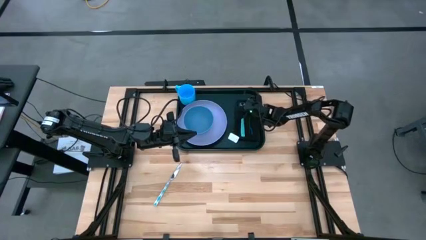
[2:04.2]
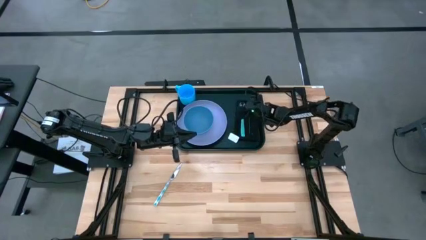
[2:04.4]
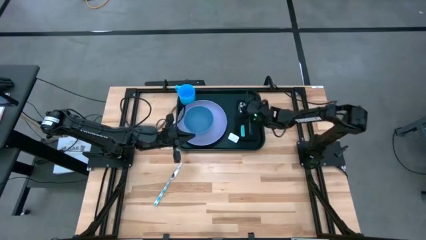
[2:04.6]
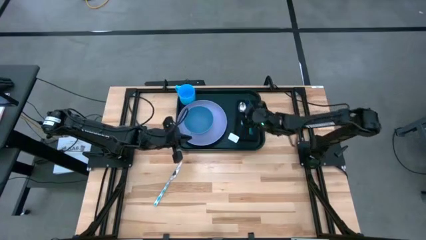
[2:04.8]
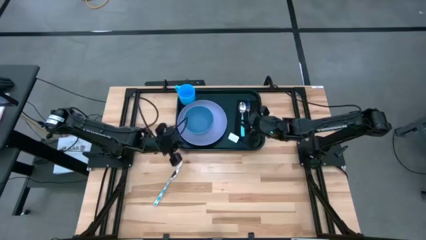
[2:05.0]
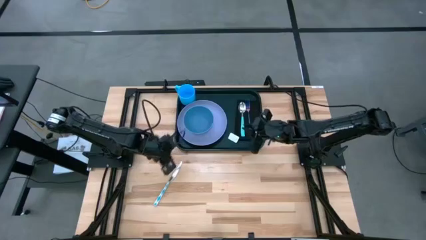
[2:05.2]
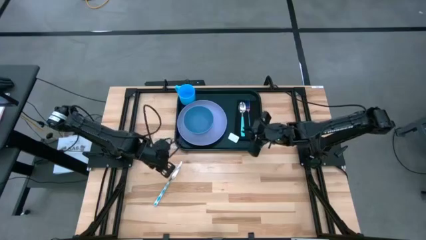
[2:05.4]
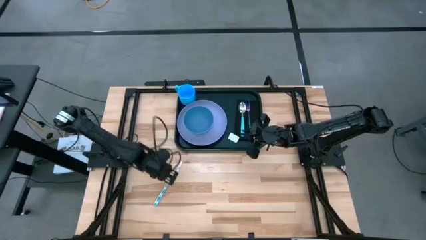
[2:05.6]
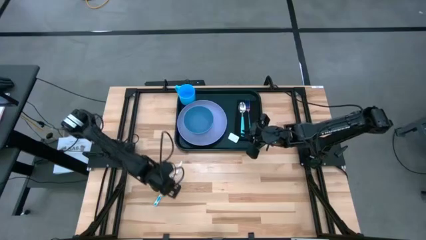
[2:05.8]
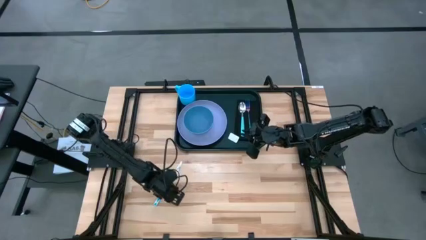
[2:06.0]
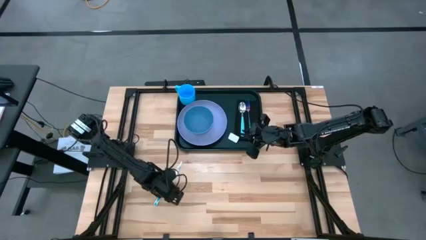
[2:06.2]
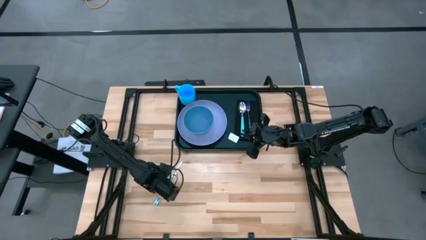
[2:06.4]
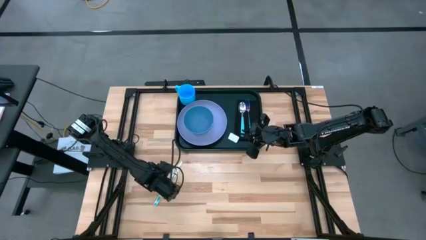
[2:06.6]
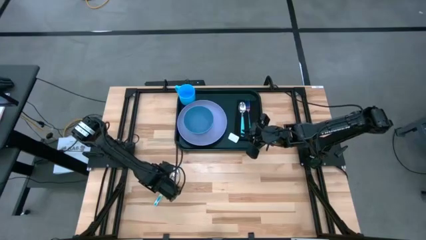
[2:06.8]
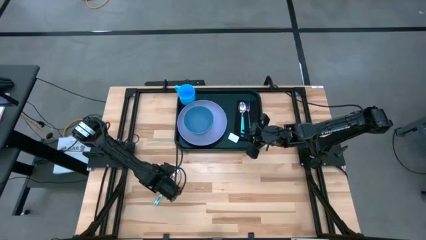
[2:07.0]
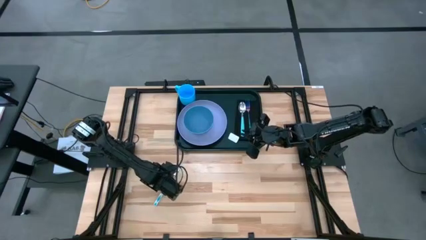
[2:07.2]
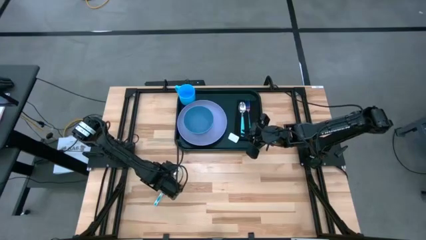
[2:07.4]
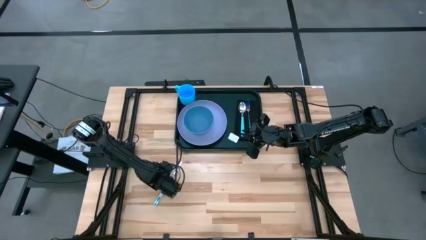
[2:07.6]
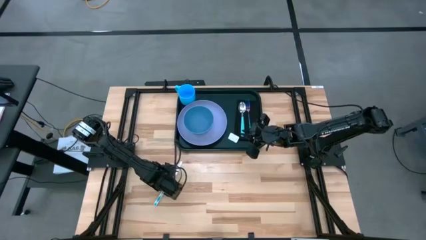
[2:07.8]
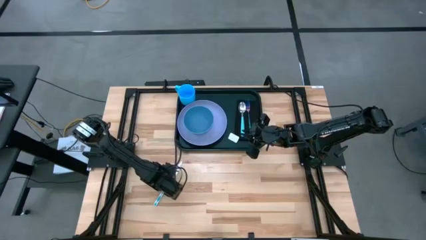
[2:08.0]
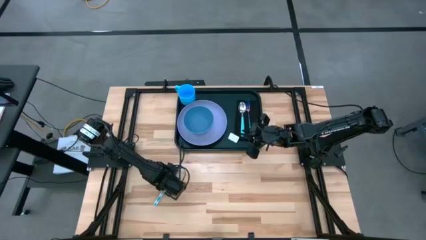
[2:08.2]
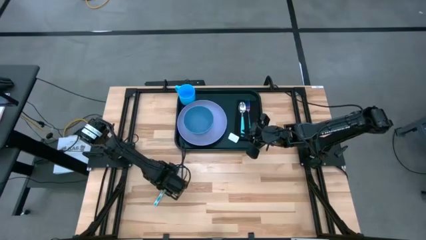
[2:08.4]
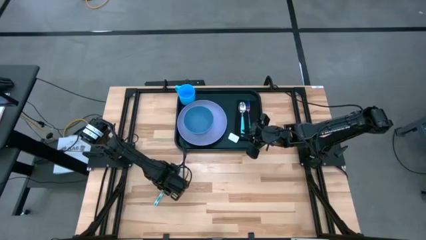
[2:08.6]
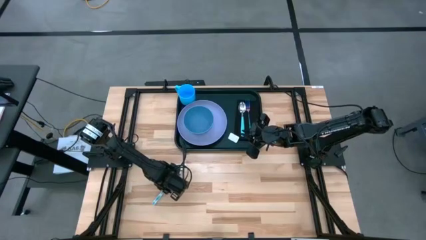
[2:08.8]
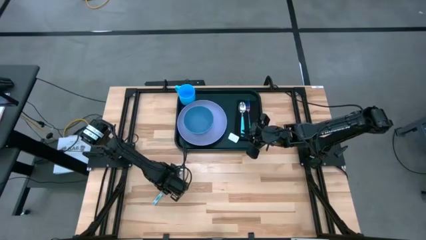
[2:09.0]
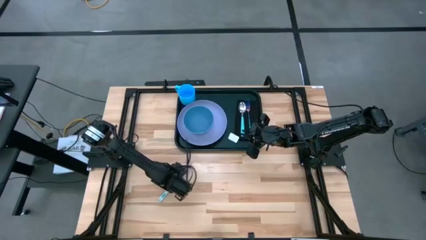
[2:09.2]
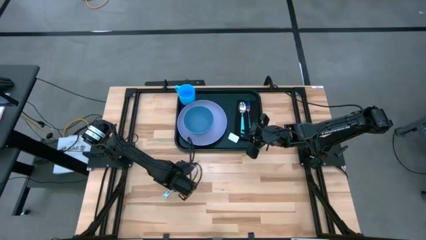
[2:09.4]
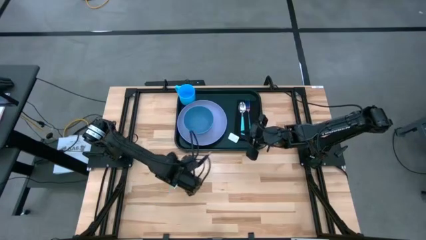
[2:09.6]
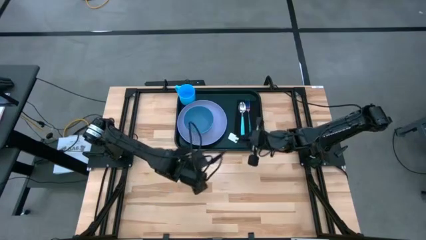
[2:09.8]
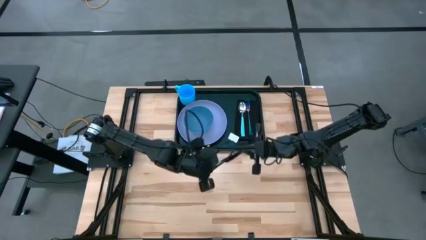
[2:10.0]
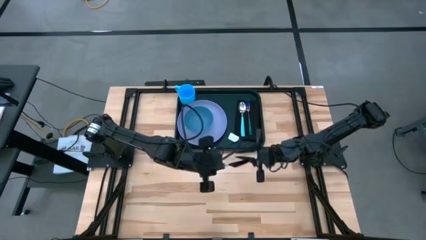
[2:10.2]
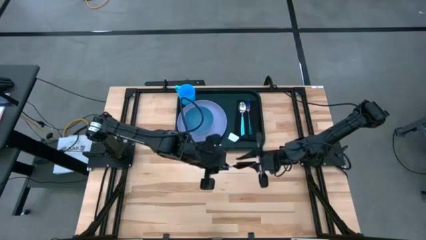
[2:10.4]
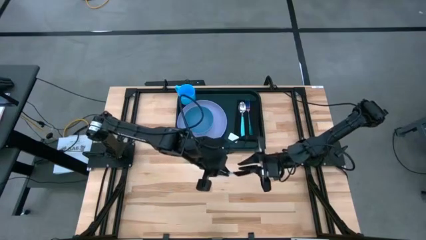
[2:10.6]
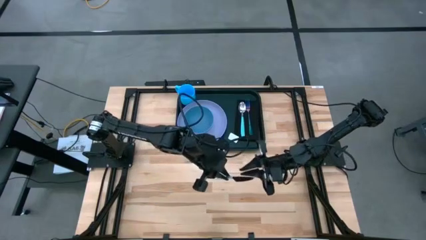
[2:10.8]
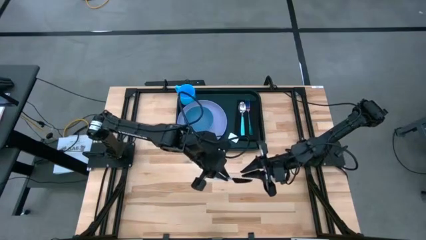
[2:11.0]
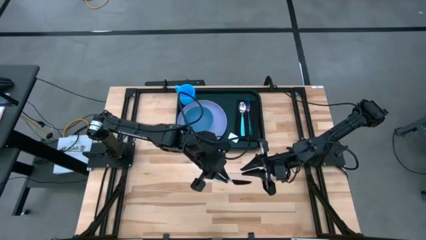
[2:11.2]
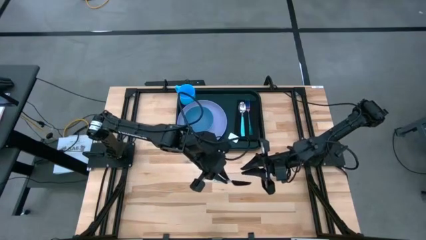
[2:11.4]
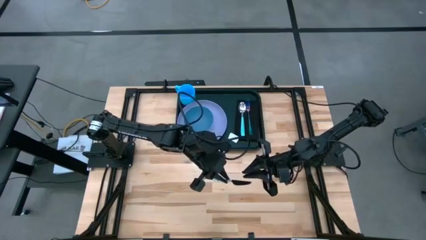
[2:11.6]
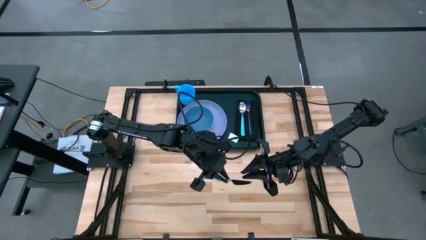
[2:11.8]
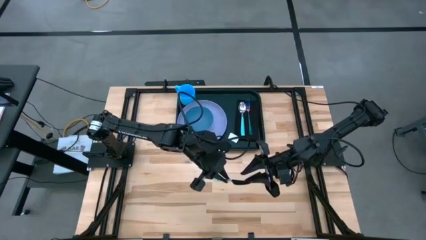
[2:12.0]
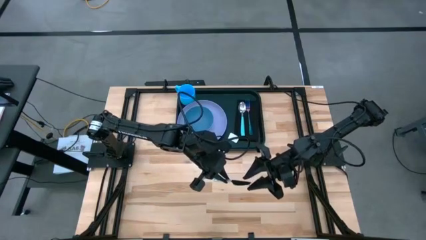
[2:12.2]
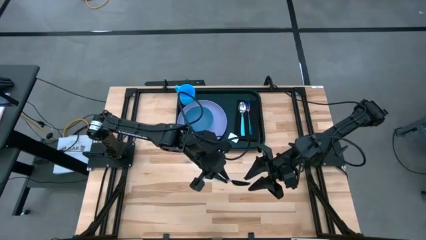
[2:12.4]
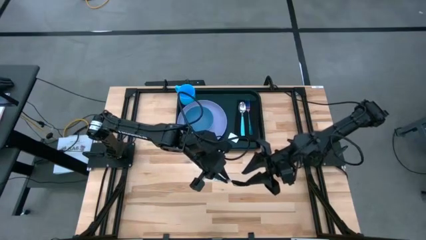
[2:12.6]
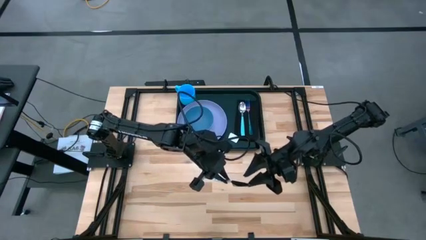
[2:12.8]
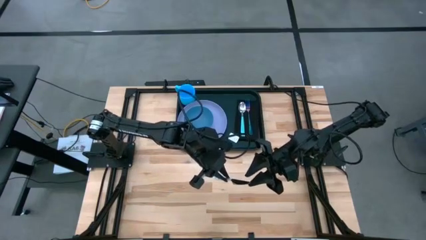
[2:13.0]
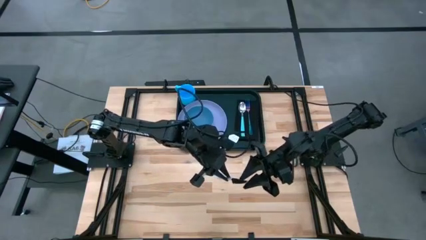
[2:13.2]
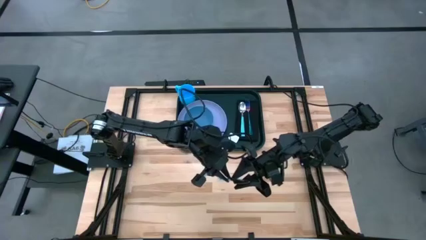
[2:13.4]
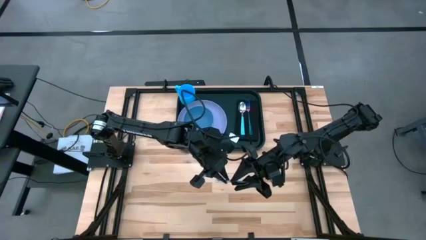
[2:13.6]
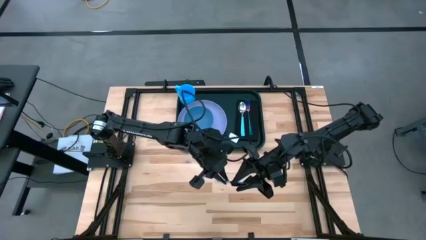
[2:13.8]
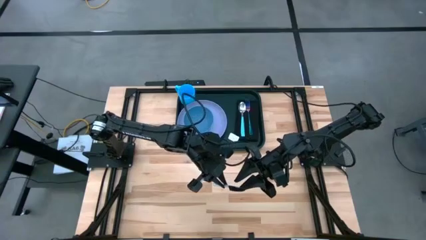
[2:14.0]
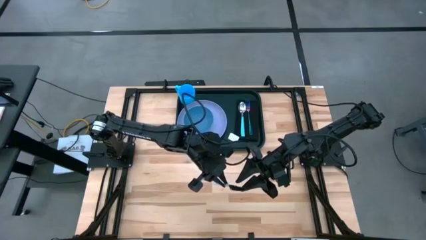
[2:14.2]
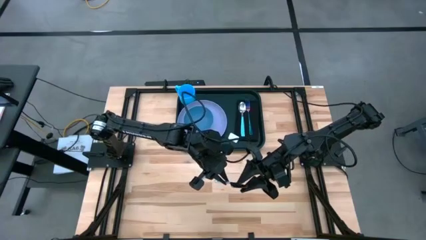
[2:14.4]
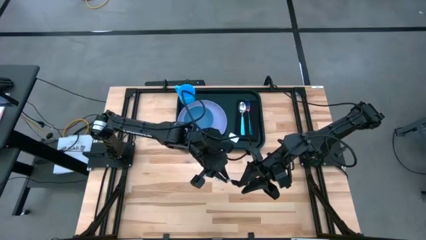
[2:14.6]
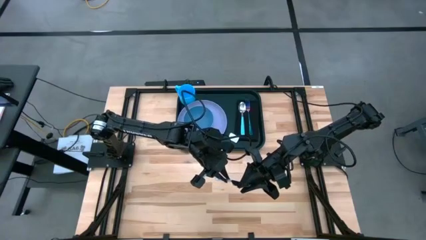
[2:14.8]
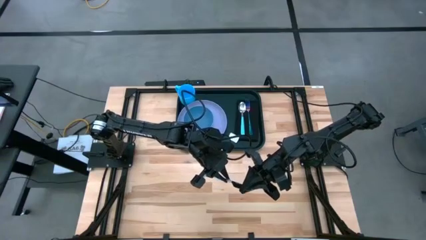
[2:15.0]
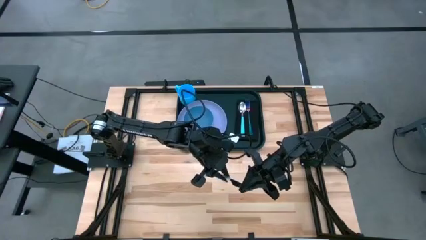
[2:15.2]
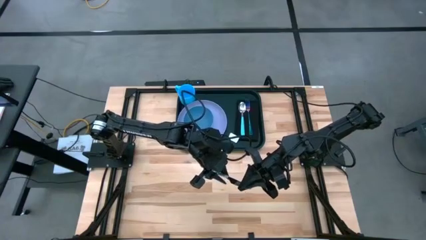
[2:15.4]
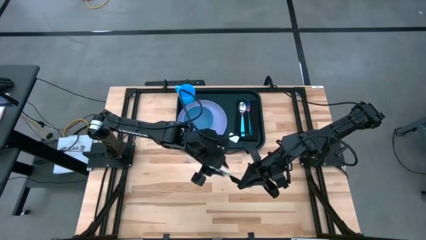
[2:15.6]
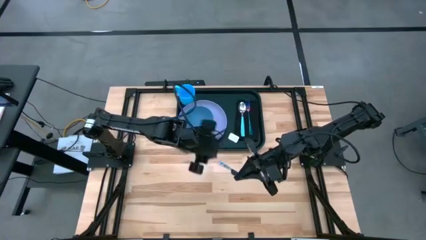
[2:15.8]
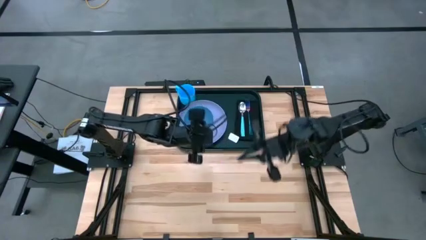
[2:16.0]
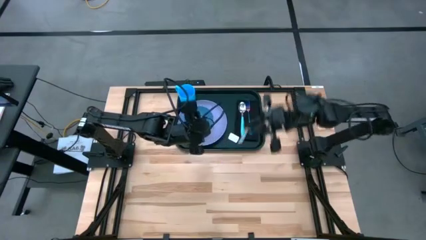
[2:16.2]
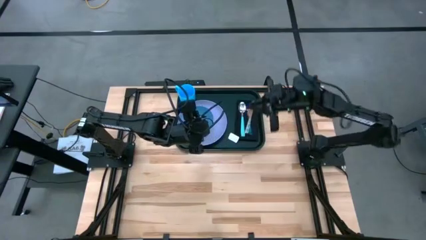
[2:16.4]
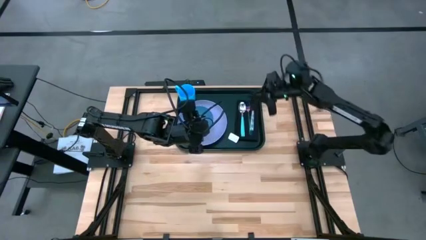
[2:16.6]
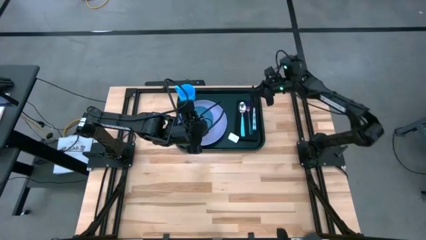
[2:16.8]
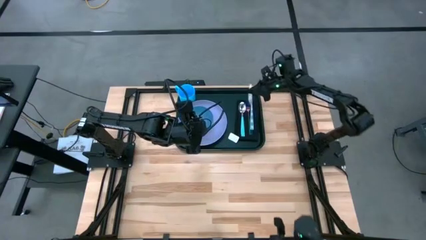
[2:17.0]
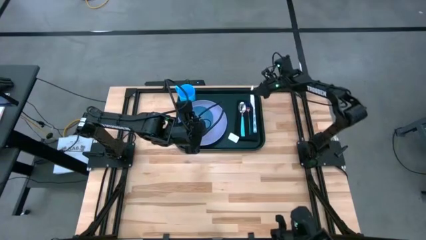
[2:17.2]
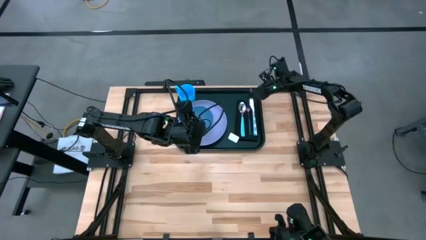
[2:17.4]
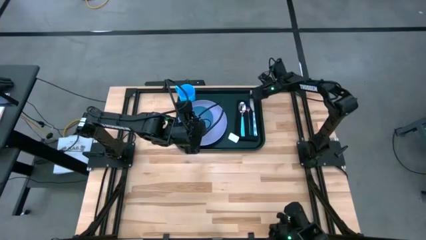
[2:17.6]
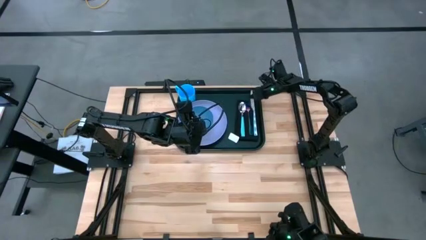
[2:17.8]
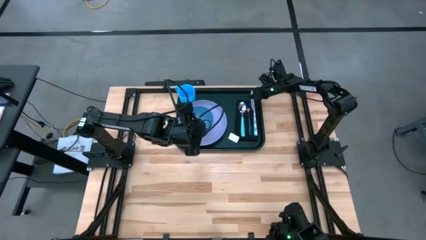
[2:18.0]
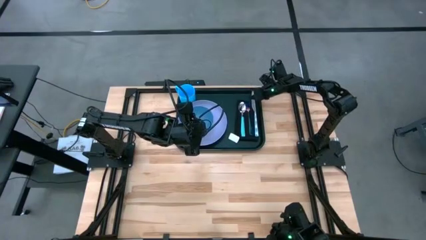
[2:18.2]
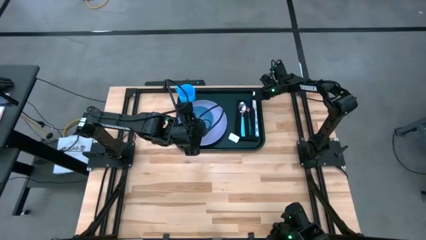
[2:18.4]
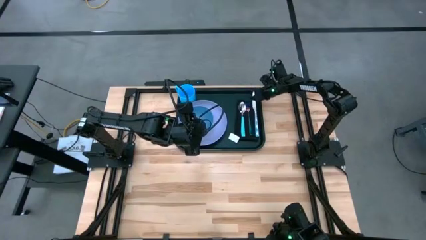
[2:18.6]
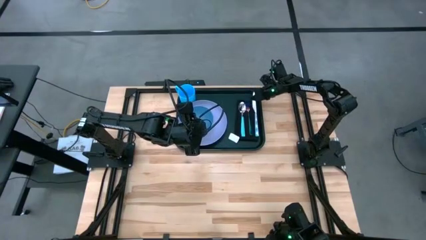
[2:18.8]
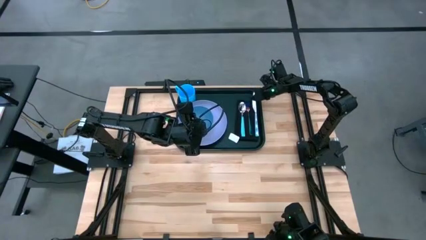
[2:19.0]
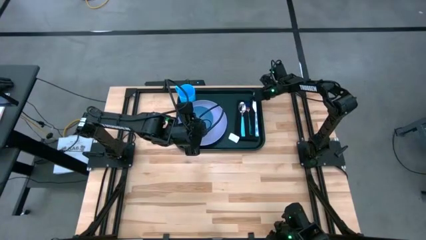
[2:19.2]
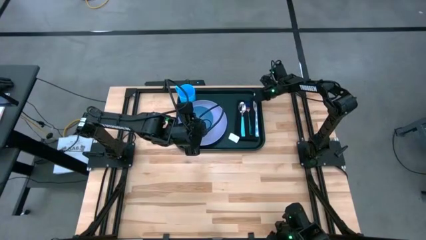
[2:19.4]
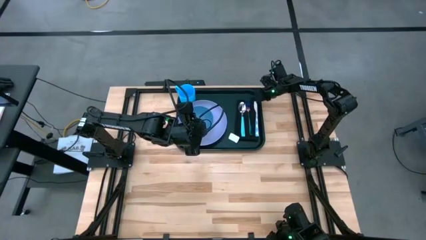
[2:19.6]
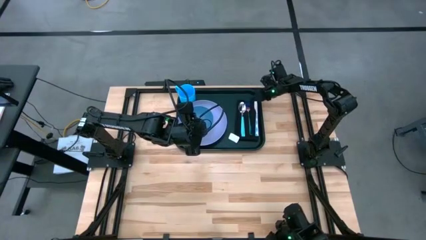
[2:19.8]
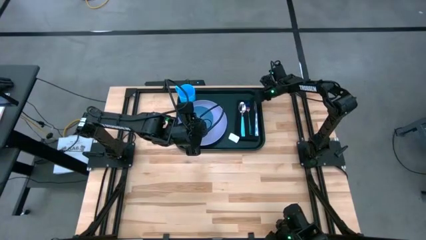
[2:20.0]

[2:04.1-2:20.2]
Task: Set up tray
Put the blue knife on top of the black napkin to the right of the blue fork on the black tray
